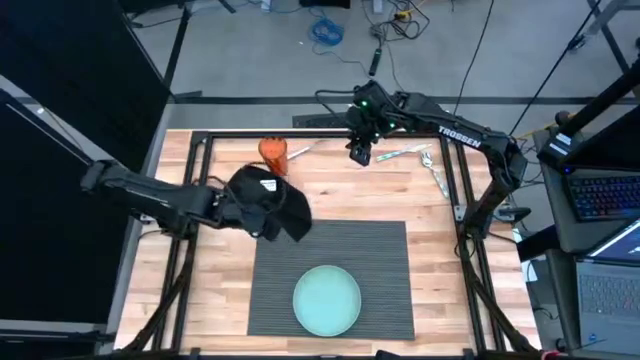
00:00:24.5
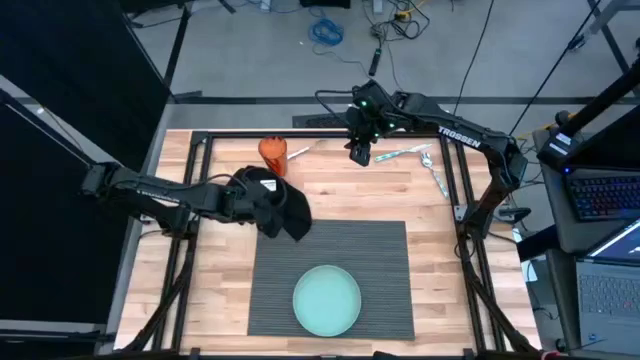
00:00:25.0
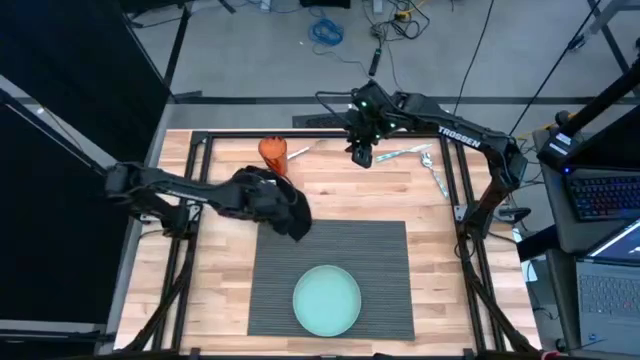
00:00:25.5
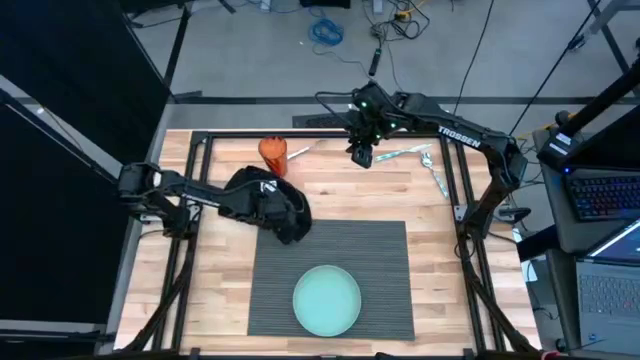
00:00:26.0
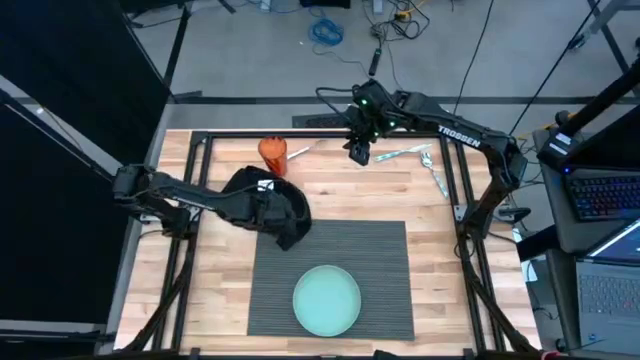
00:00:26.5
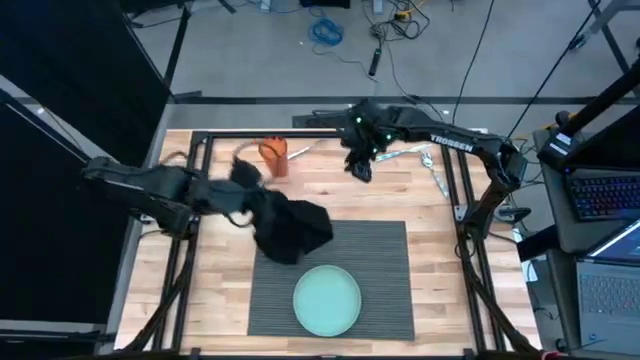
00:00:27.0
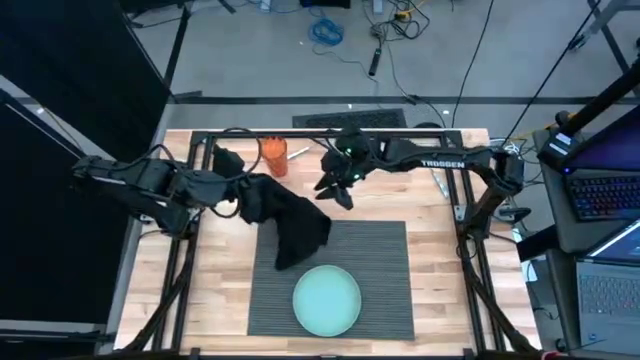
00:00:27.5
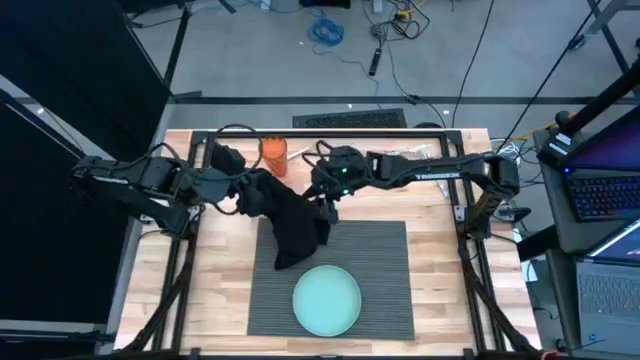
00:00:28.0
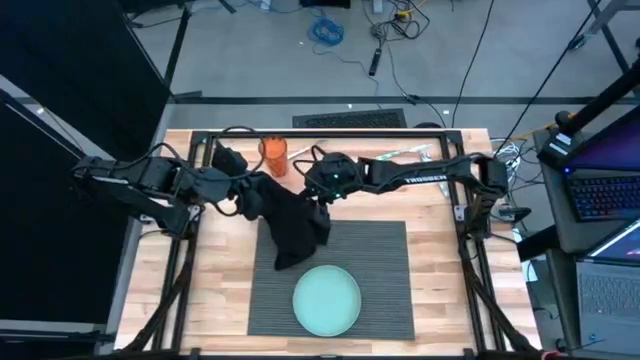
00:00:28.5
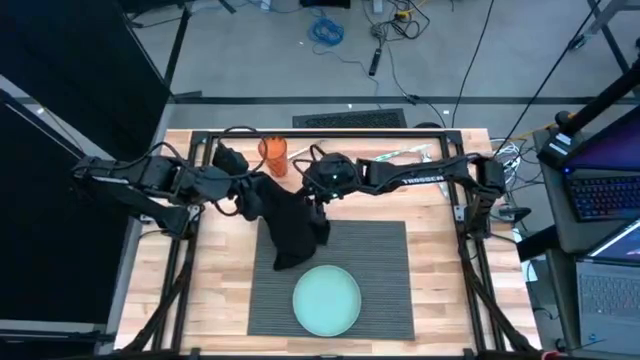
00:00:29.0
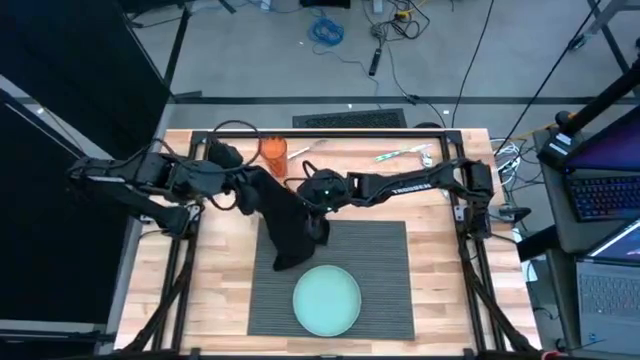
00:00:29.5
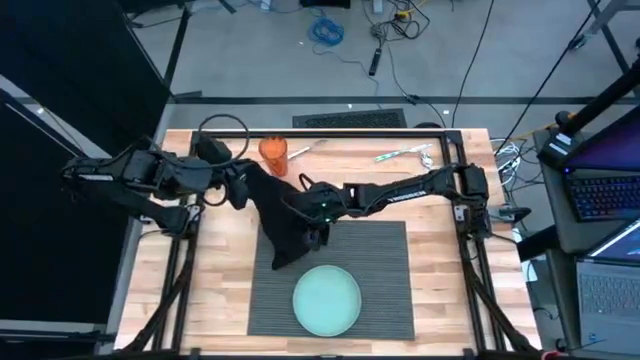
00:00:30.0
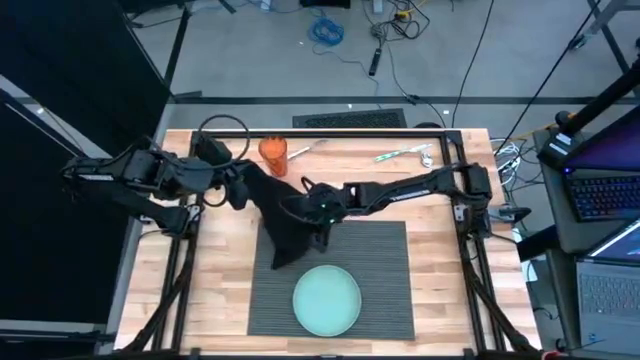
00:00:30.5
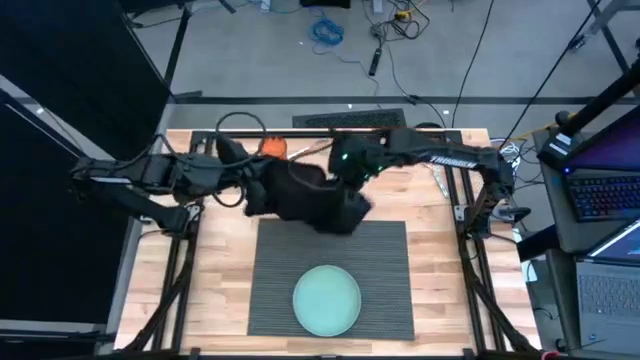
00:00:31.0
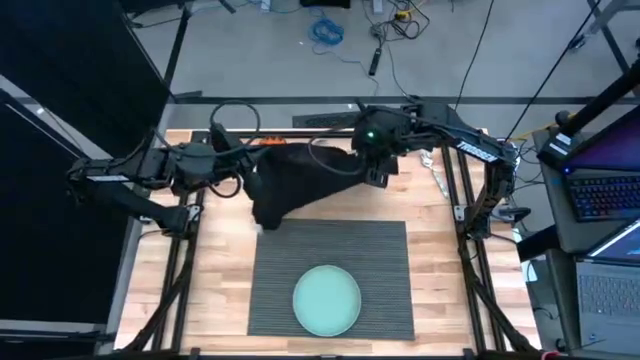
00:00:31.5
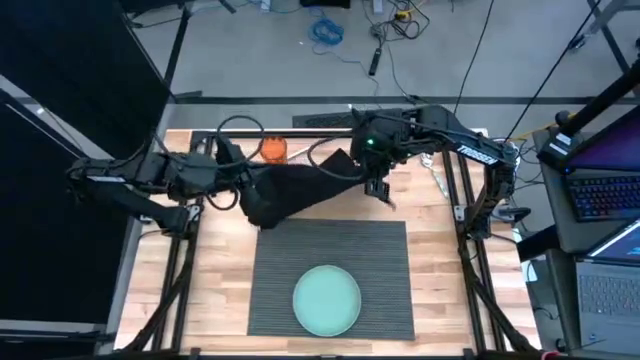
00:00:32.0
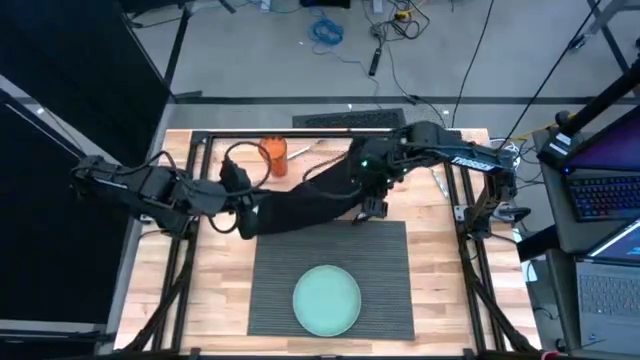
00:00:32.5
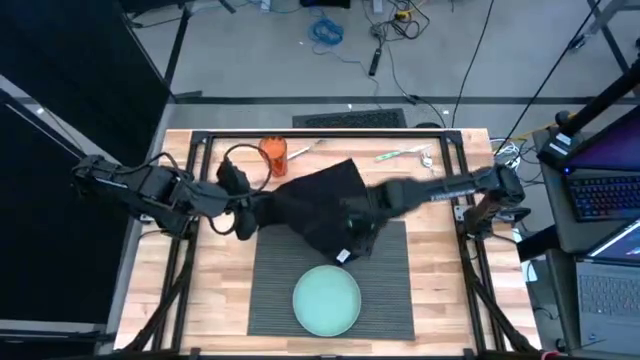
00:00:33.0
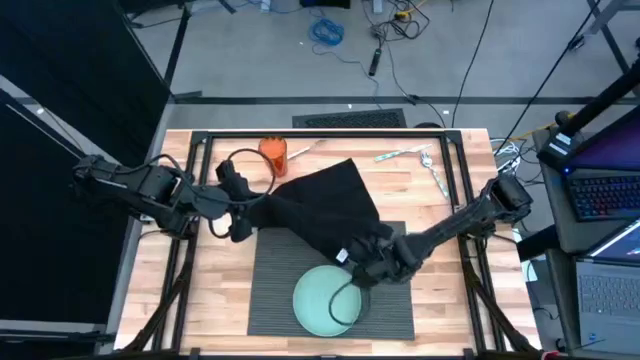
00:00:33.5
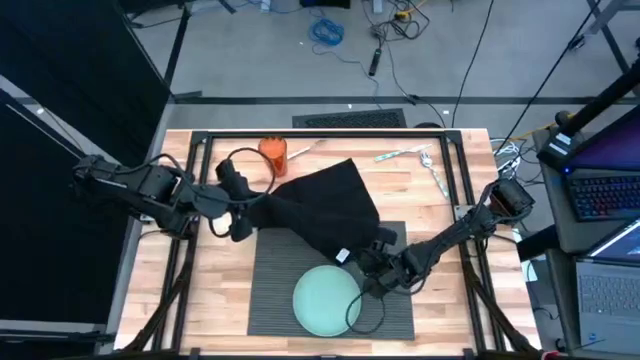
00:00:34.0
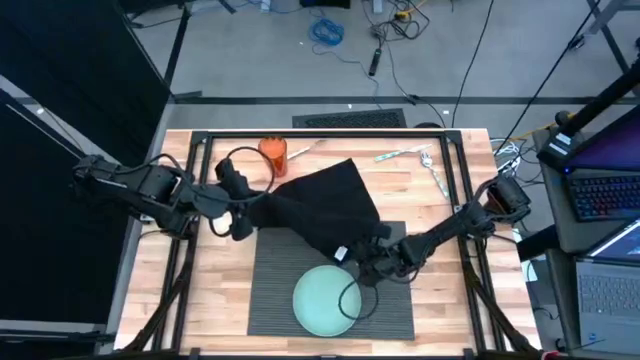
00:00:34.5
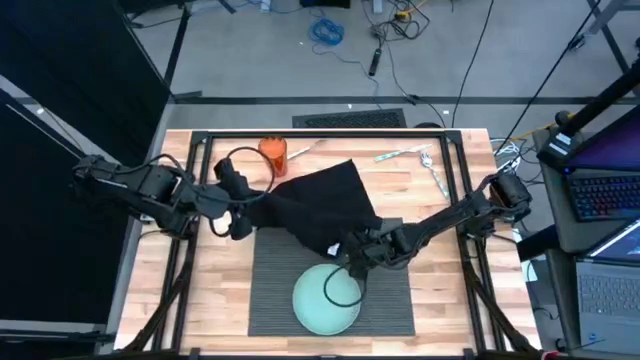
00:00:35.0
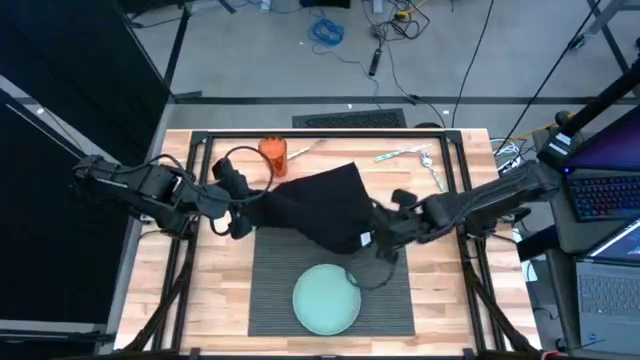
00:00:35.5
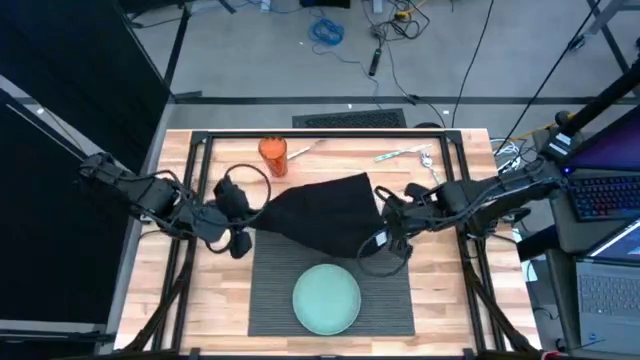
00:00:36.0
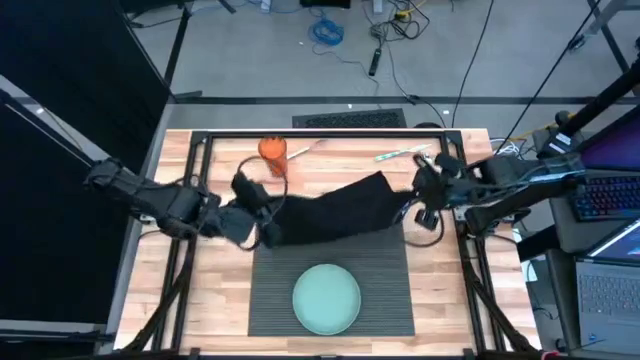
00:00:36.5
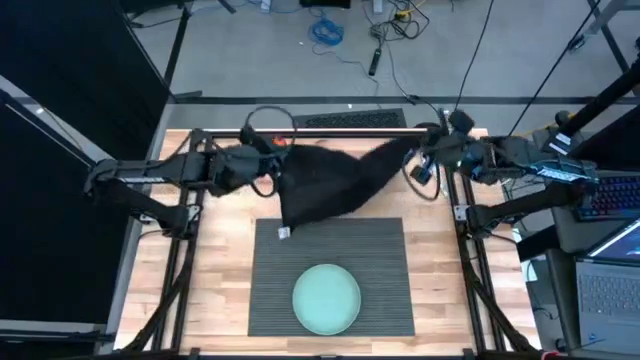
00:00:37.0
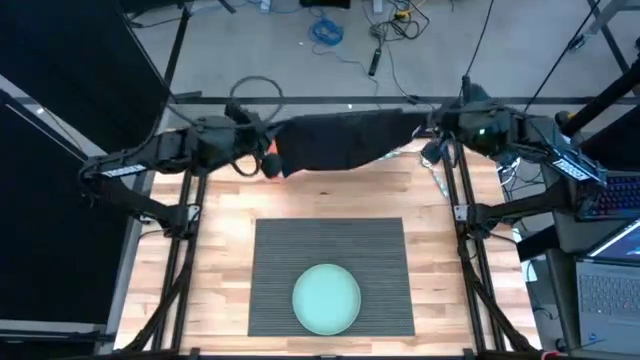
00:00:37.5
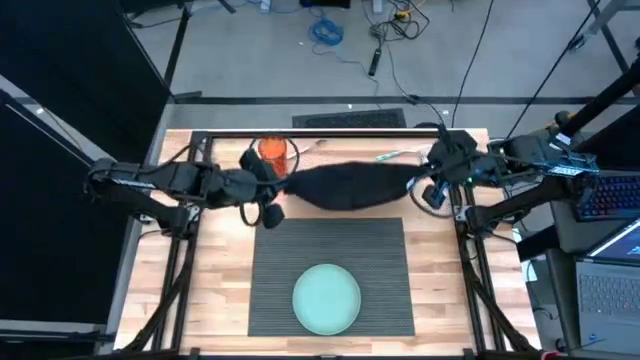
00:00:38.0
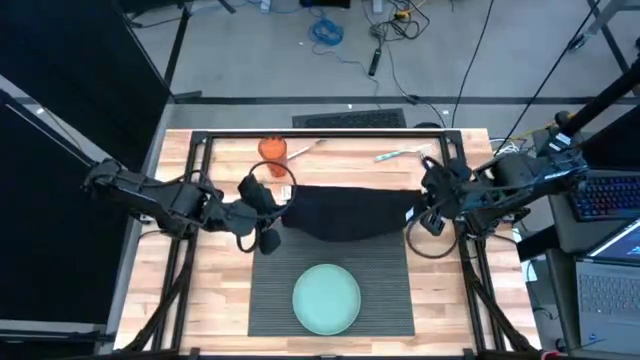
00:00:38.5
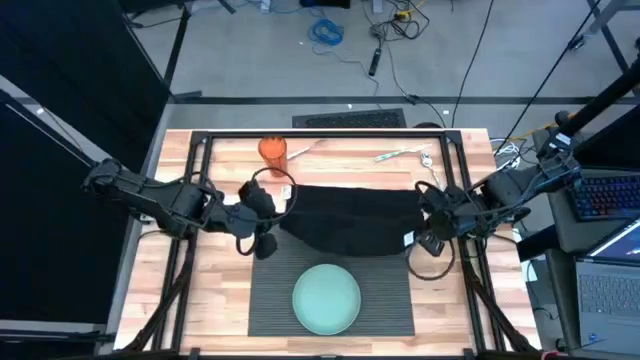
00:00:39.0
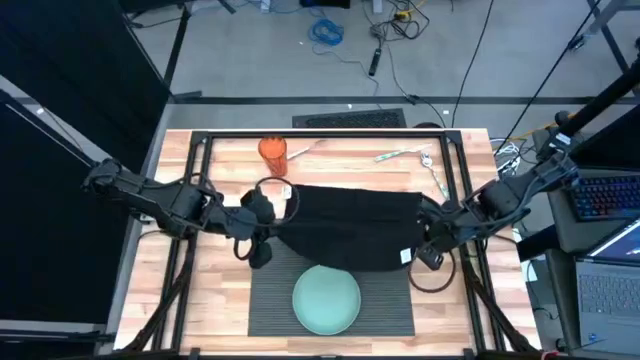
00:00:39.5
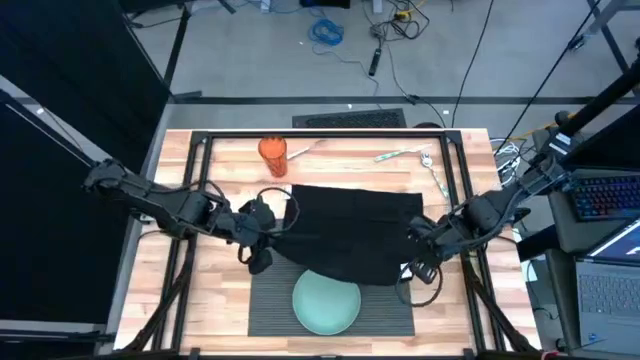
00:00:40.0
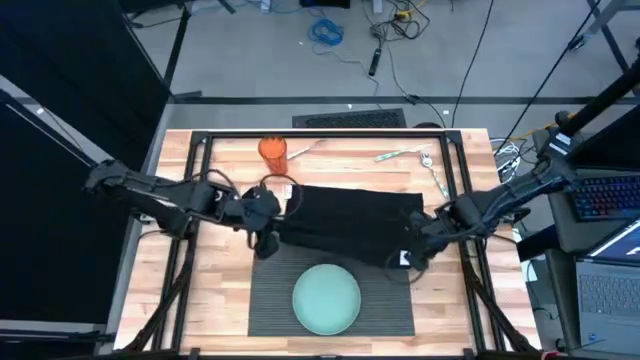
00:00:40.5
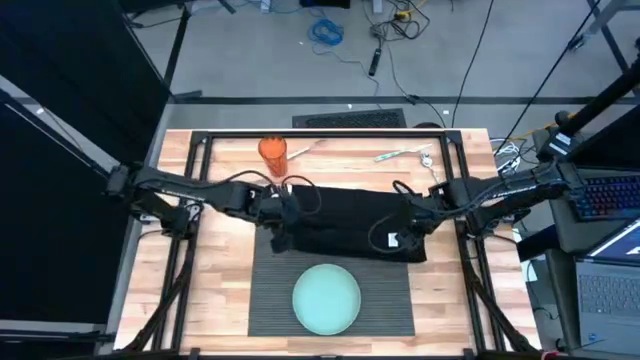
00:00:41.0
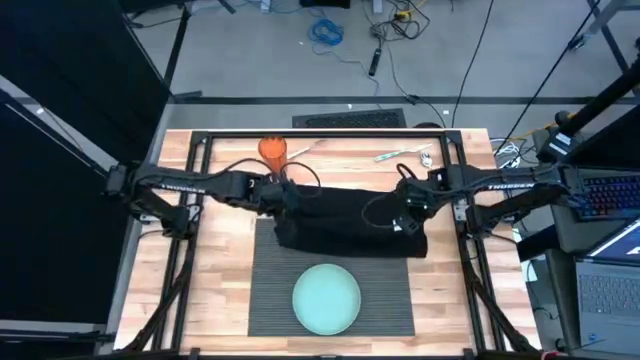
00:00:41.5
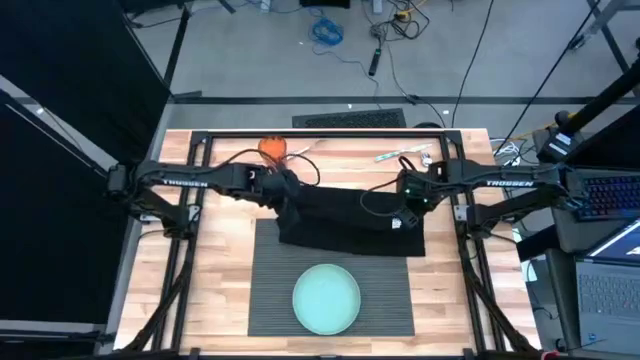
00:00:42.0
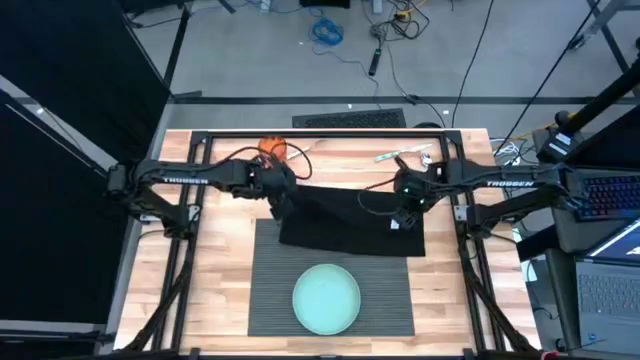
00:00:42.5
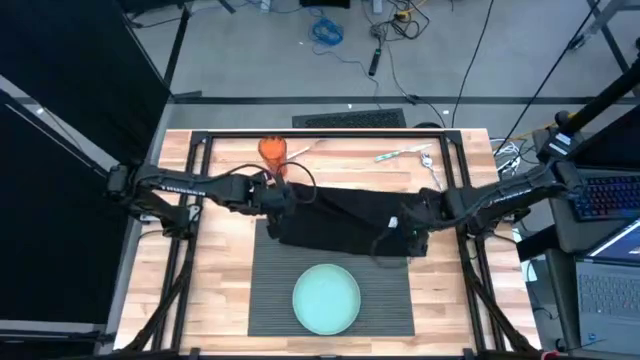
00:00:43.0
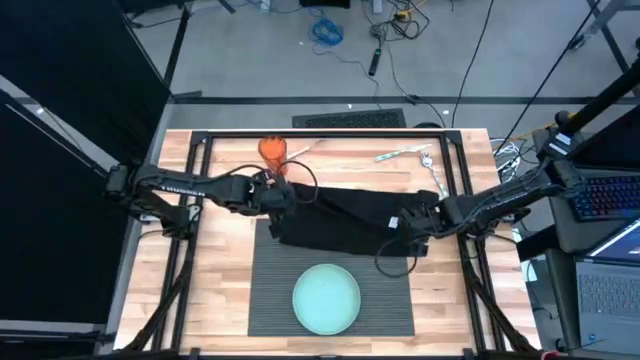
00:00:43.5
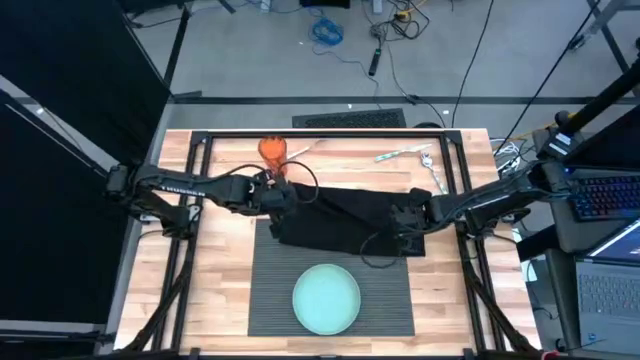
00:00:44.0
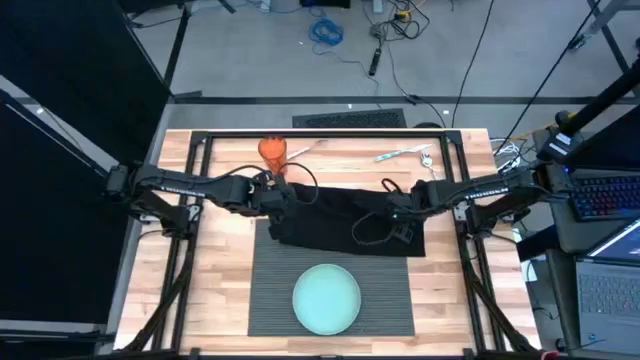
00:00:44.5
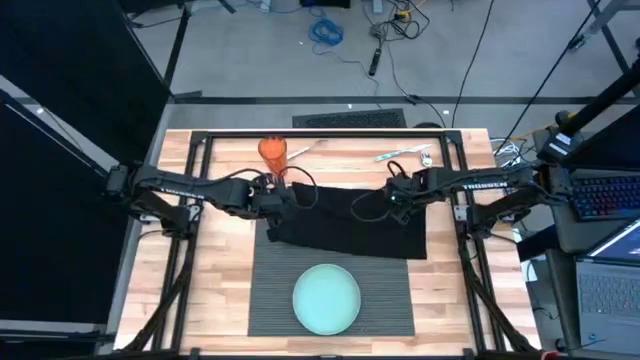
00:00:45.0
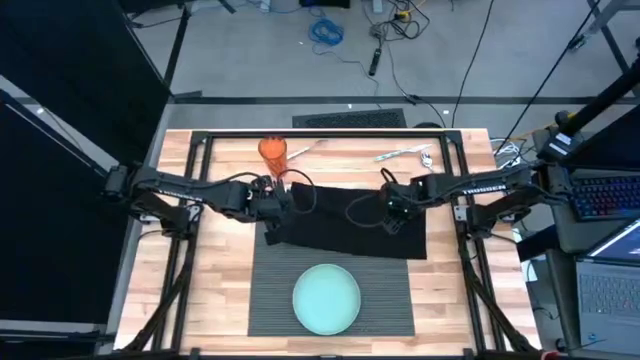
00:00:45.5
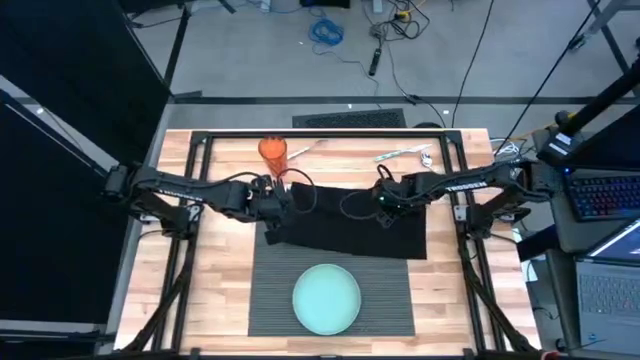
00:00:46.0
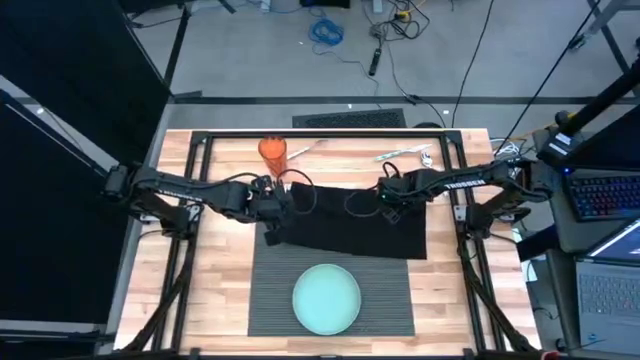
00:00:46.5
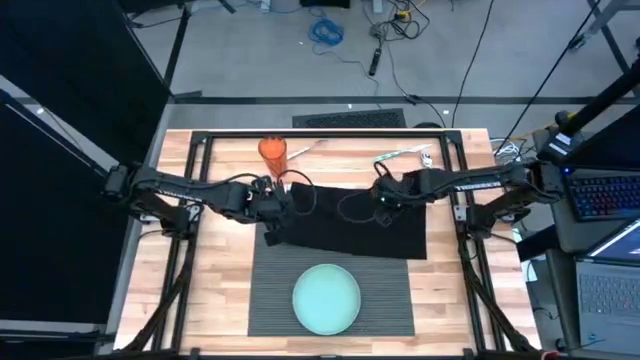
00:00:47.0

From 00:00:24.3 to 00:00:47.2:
Task: Set table place
Fold the black napkin
